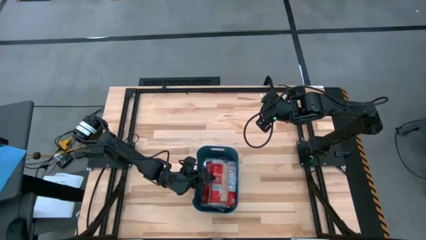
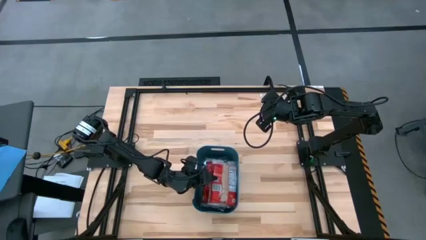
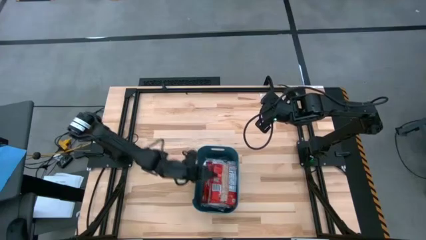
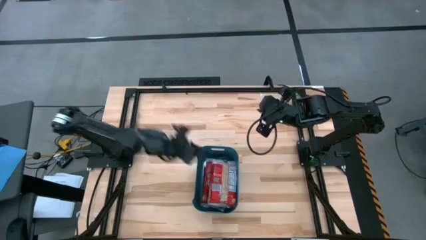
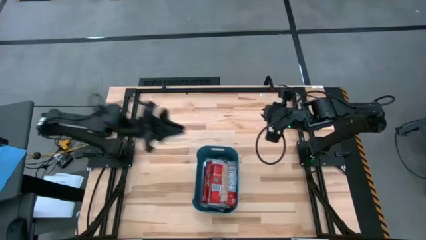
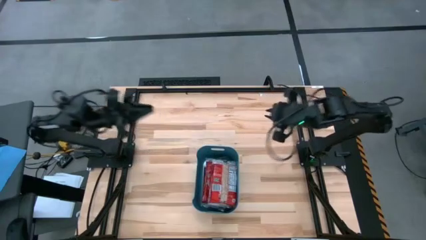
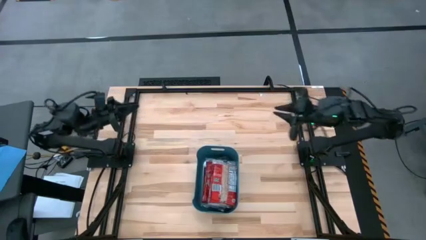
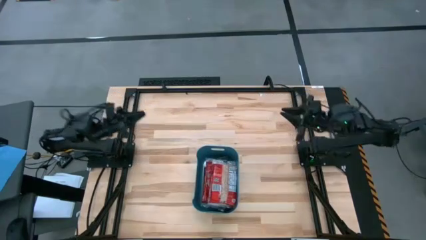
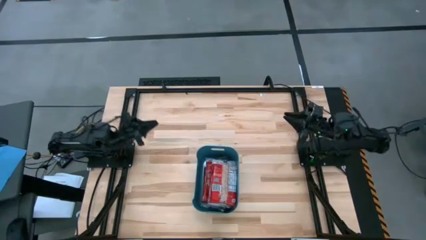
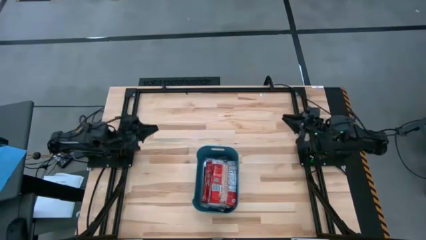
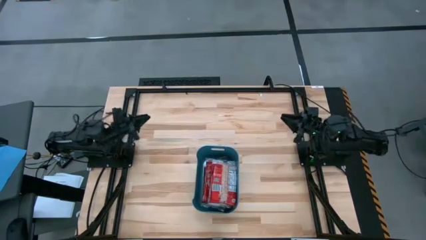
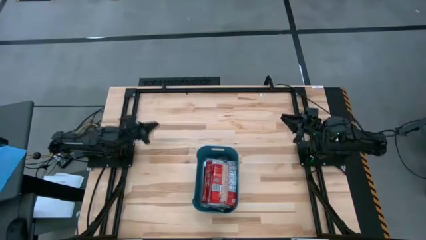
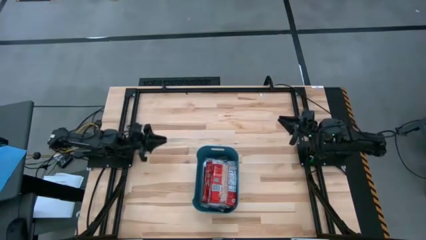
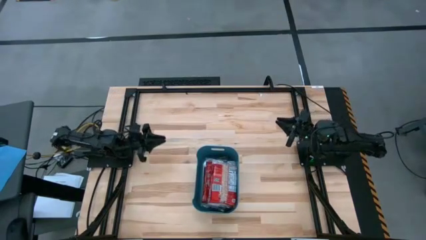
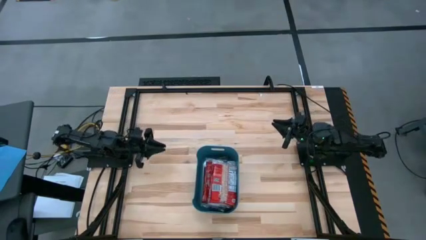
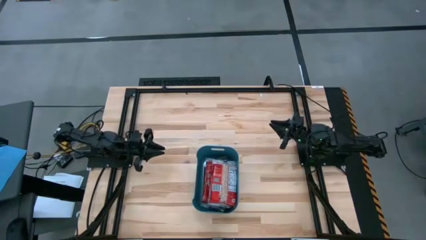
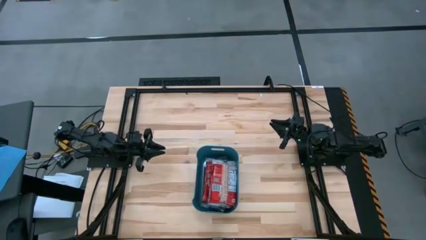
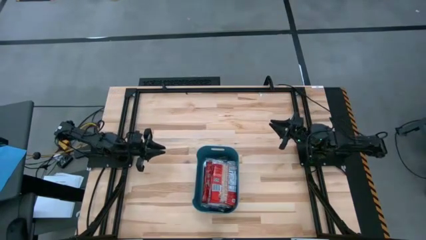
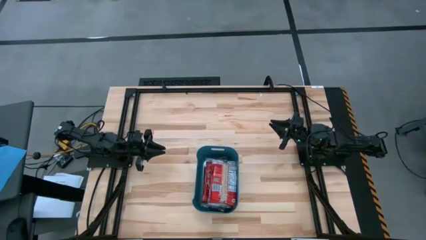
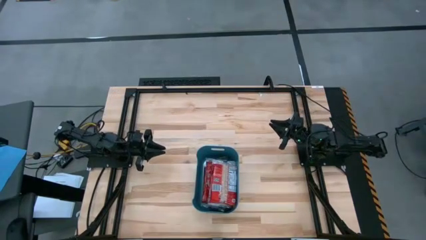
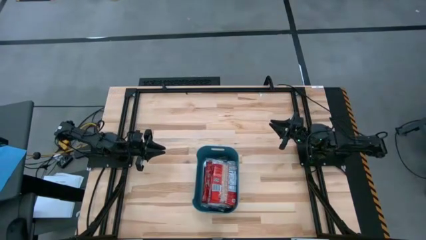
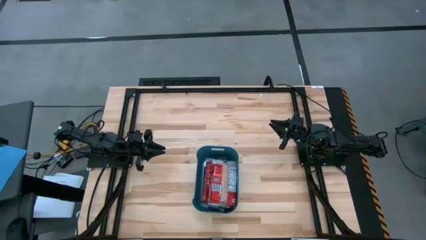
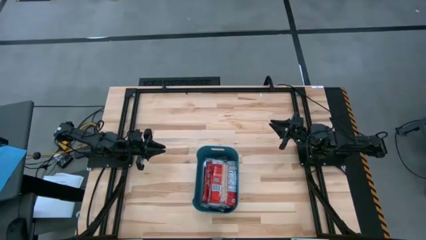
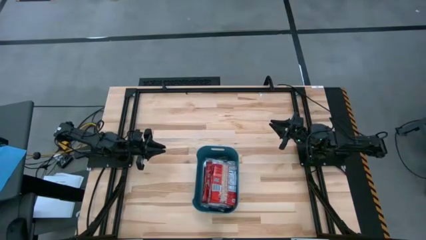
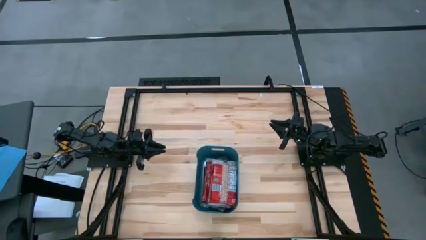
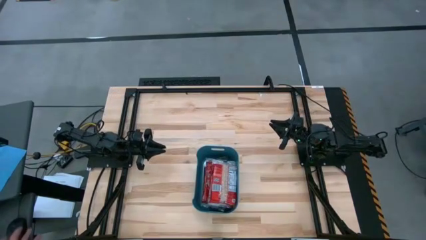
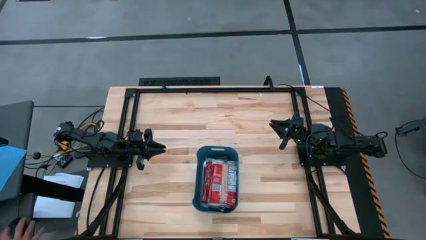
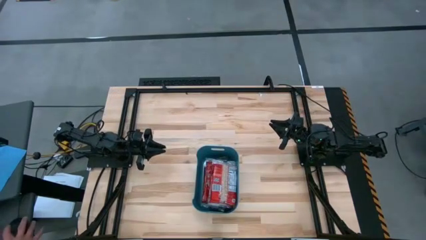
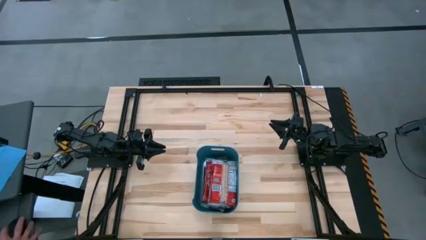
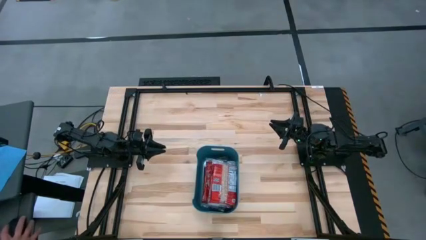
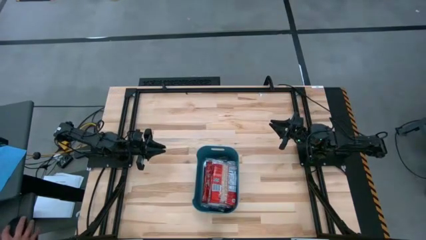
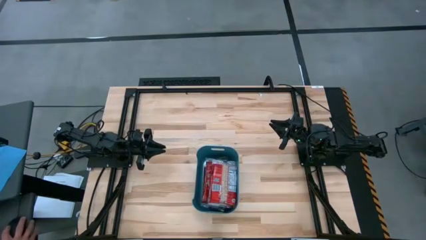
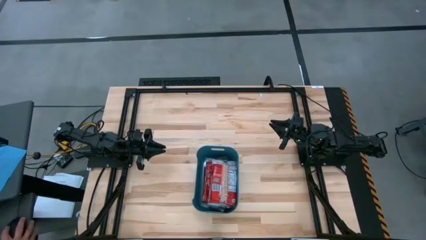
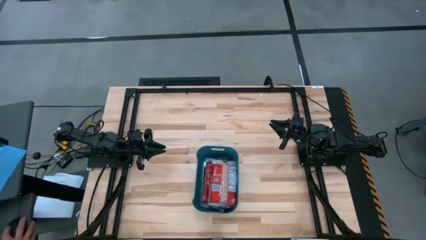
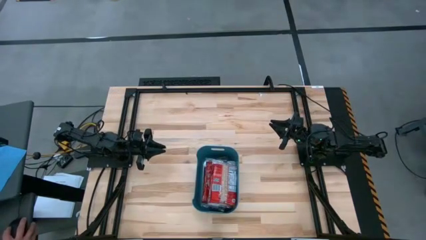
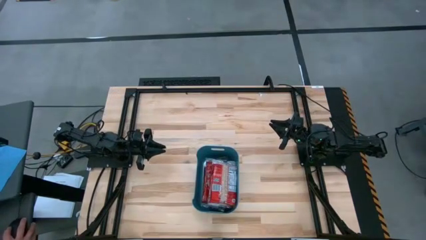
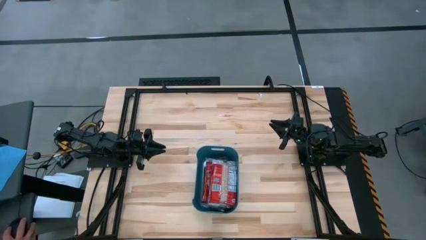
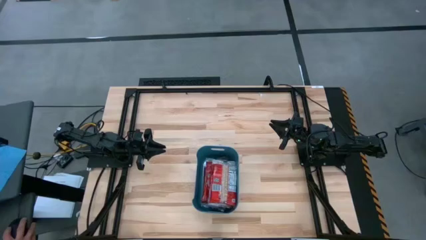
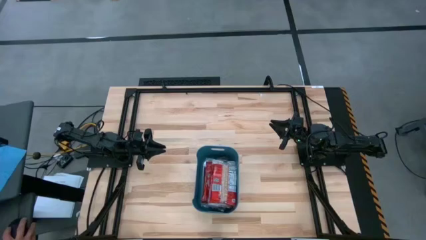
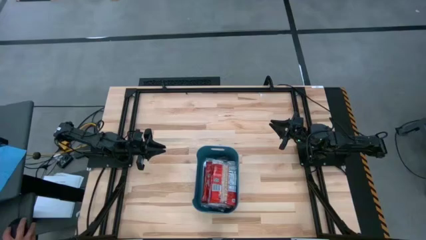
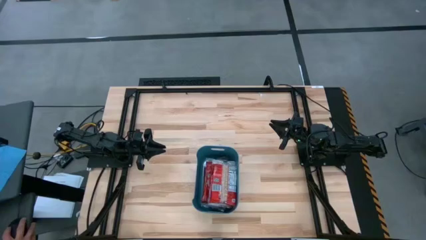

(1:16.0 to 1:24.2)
Task: Sort popcorn bags into baskets
Return to Home Position

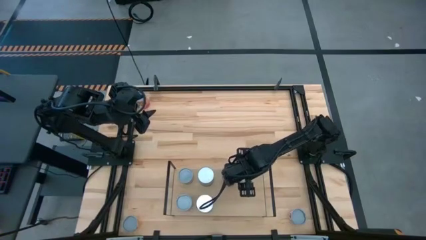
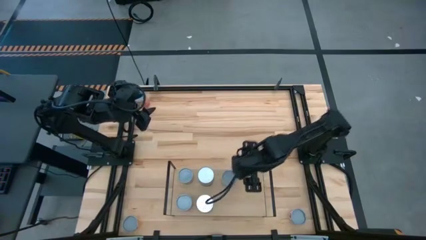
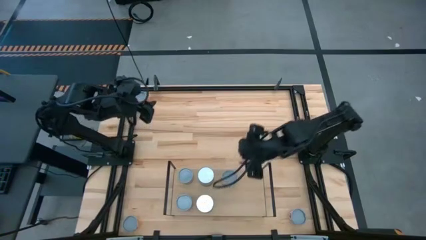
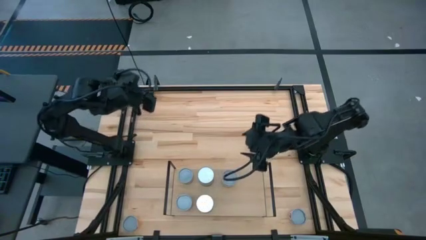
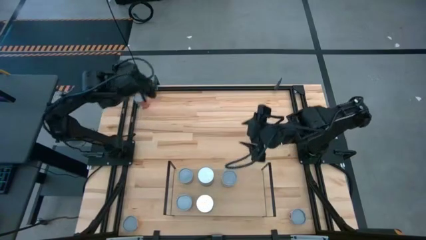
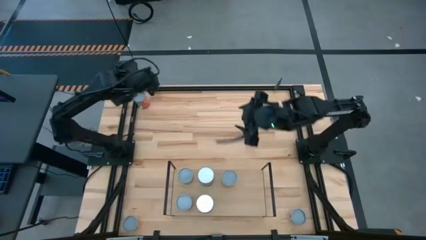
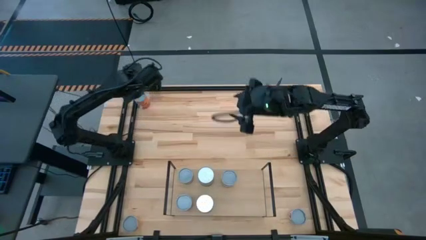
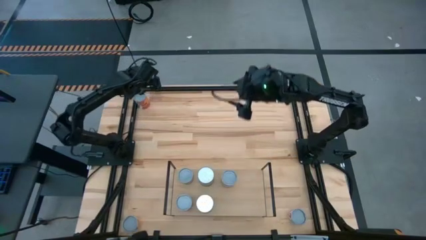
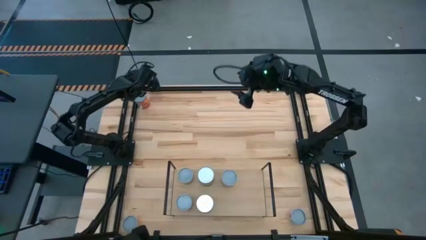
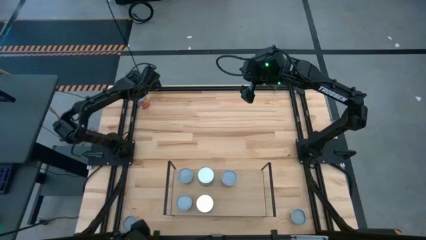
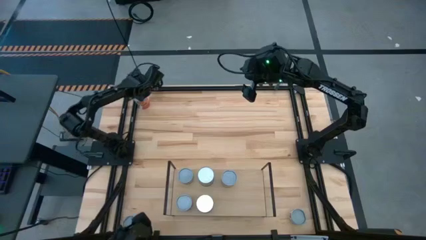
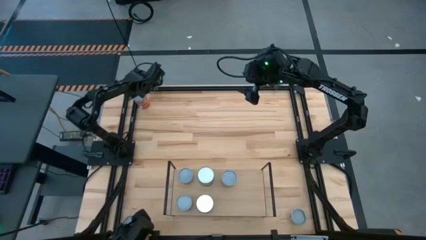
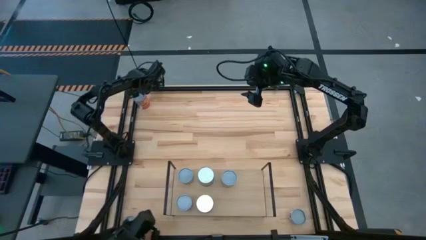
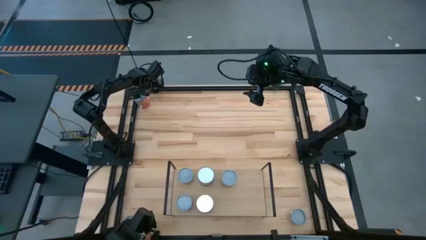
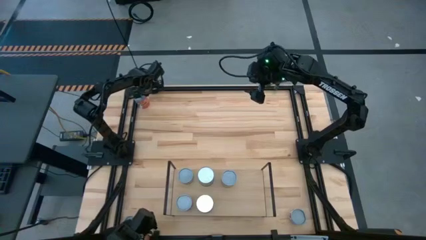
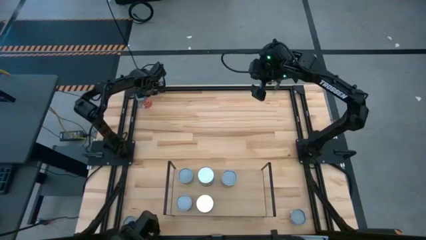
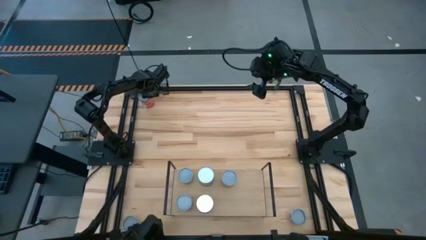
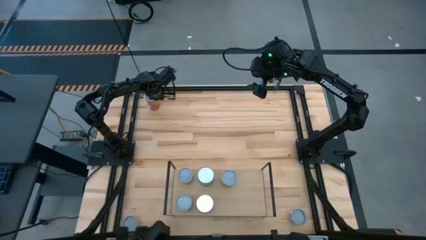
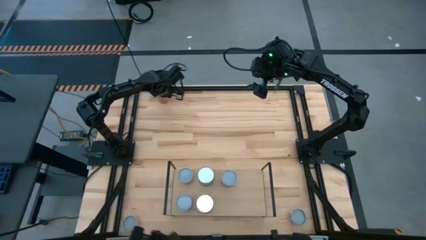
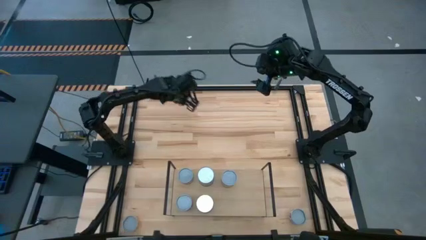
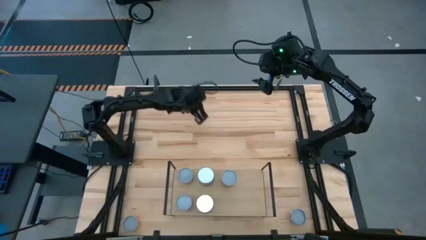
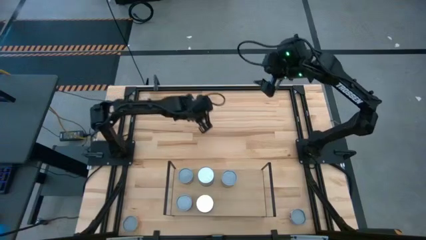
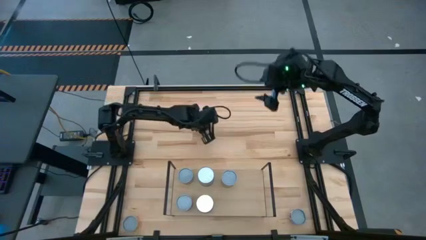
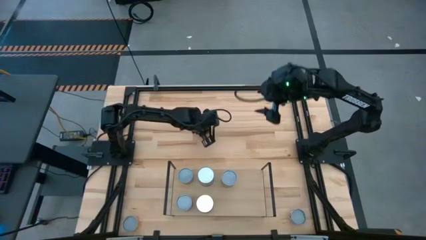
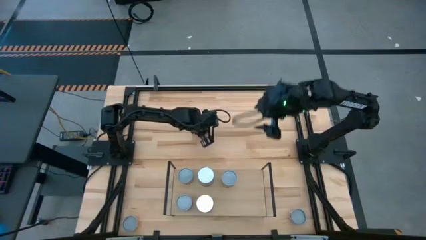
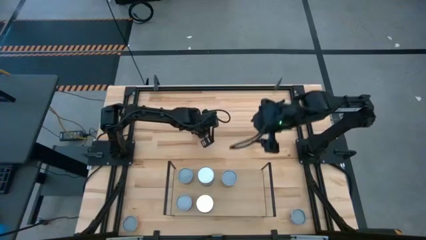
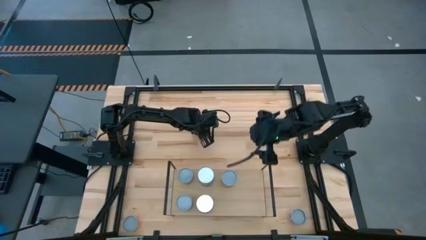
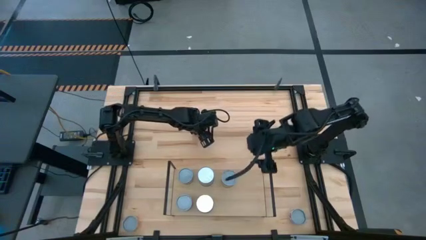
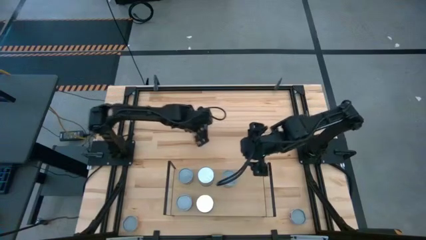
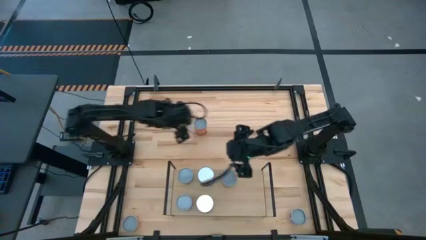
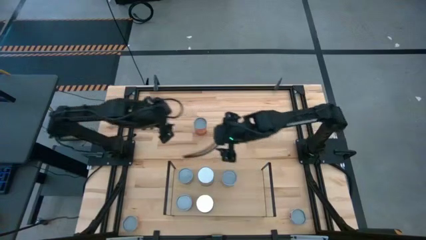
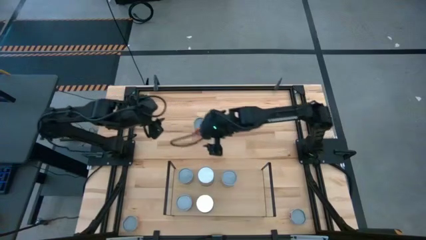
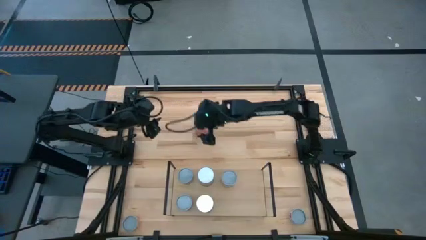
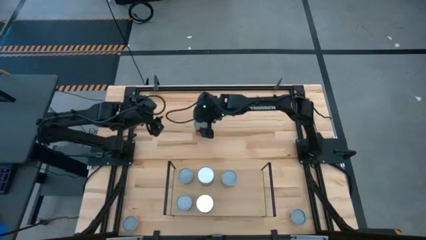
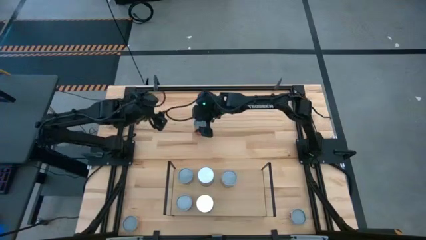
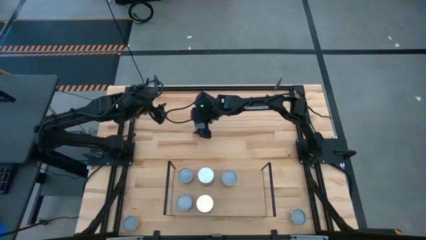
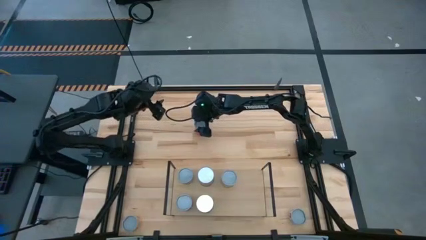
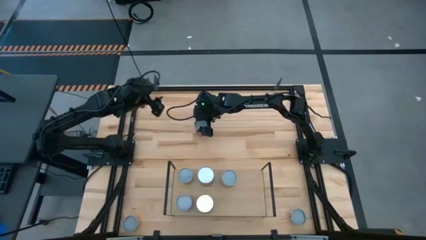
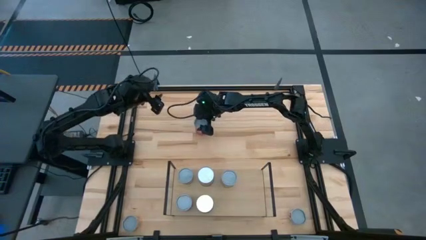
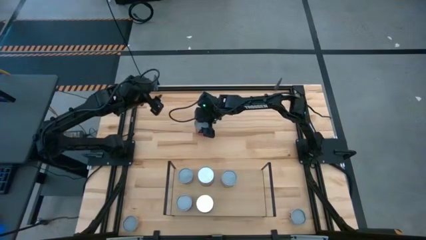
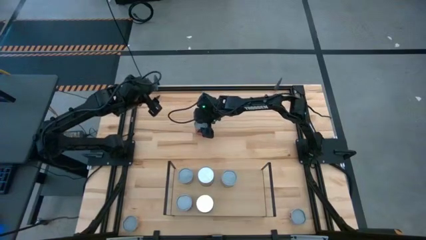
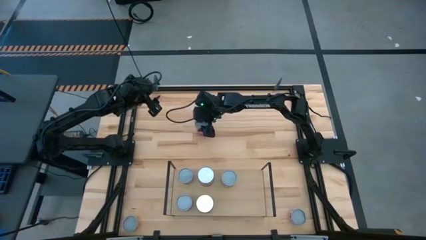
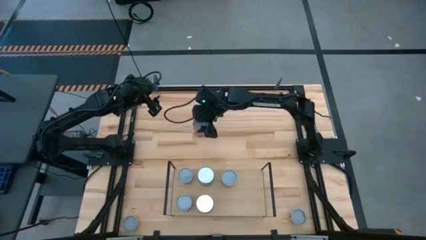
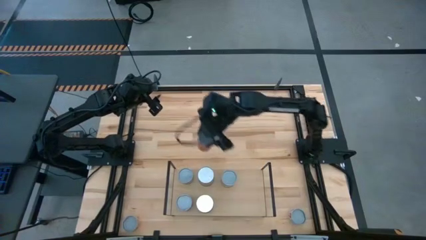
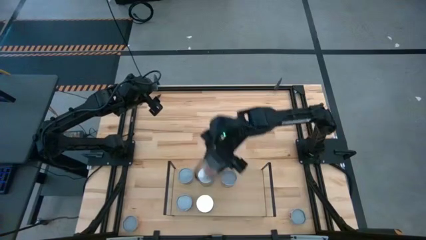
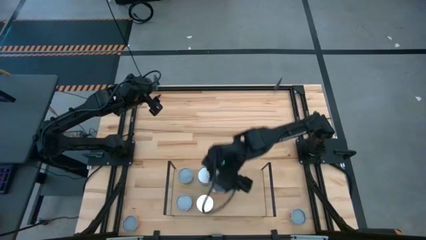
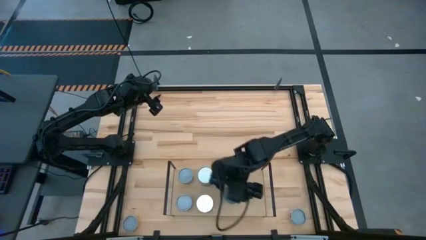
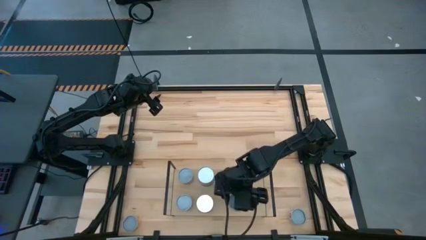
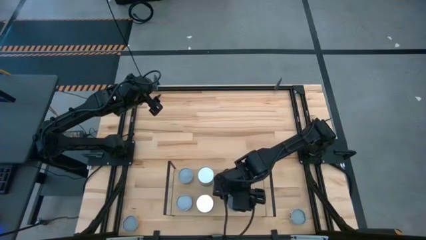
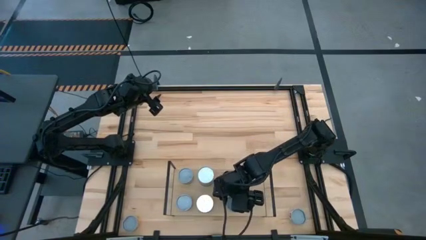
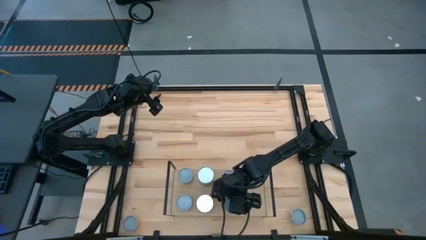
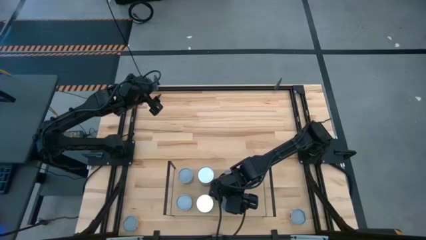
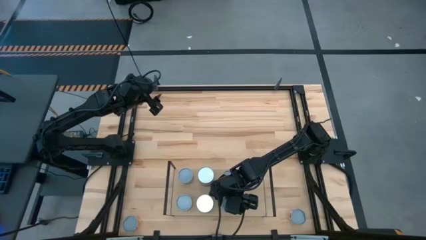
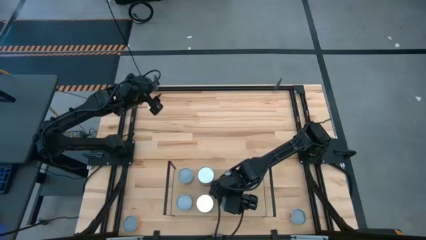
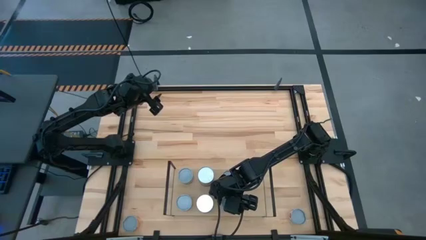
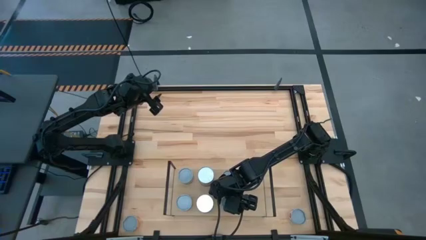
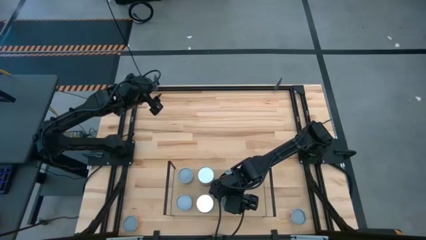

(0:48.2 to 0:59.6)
Task: Pick and place cans onto a shelf
Put the canned mixed fruits on the shelf
